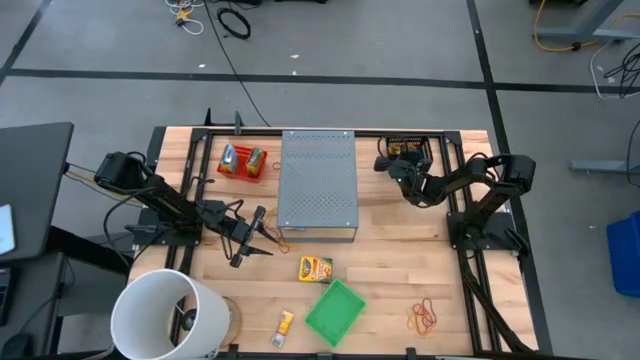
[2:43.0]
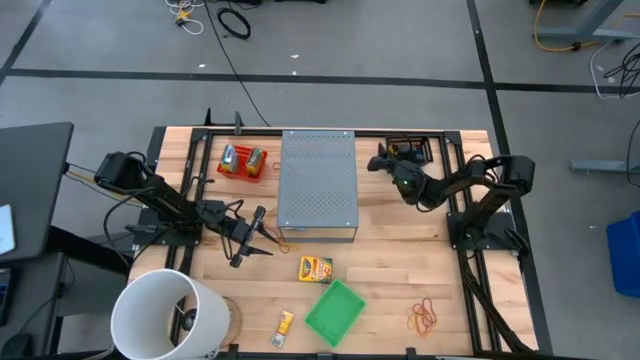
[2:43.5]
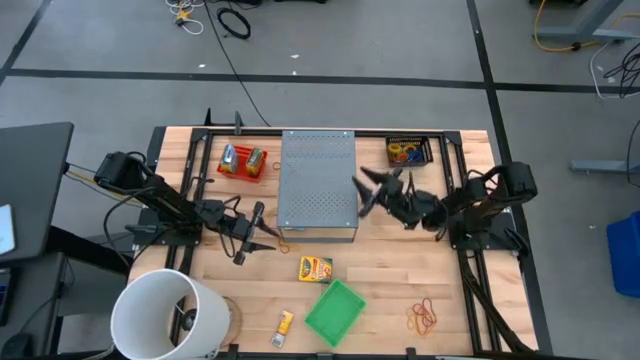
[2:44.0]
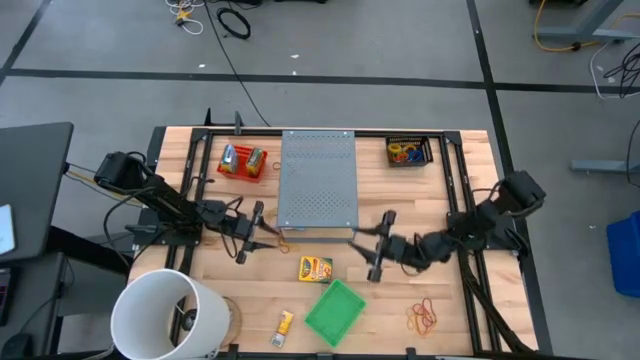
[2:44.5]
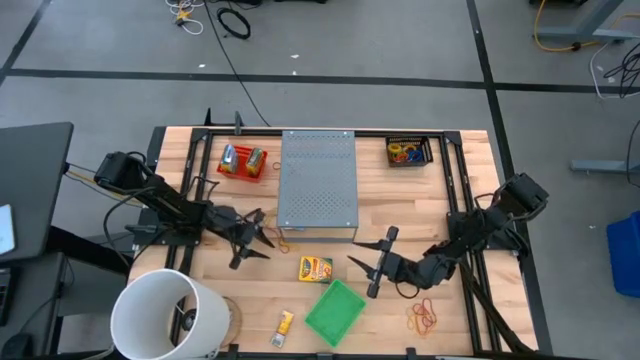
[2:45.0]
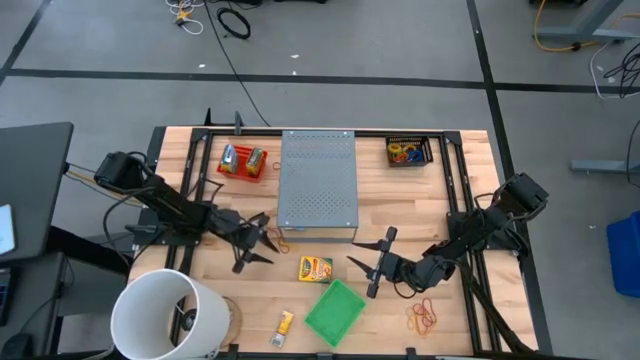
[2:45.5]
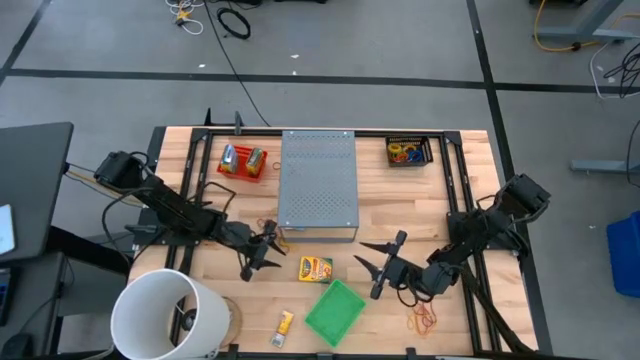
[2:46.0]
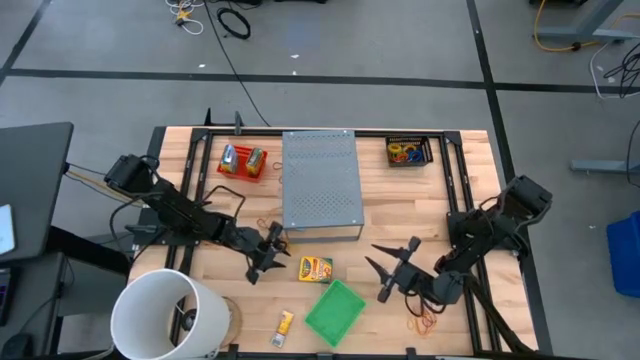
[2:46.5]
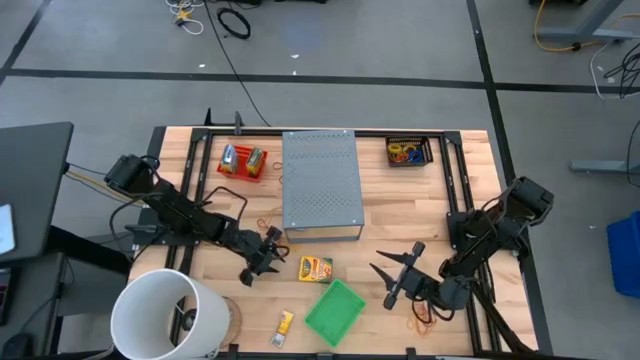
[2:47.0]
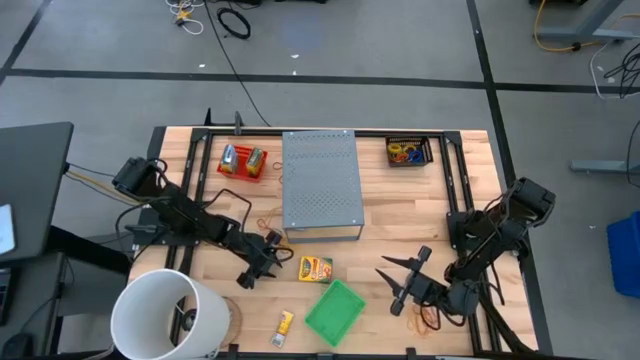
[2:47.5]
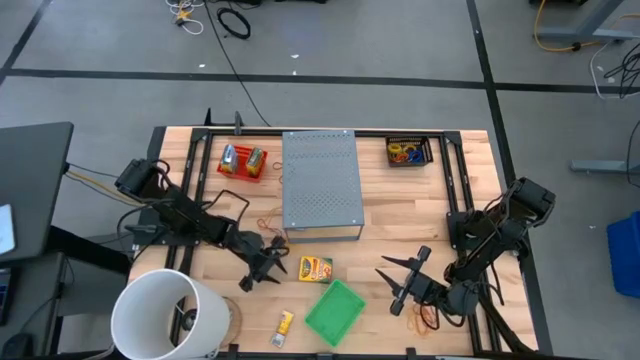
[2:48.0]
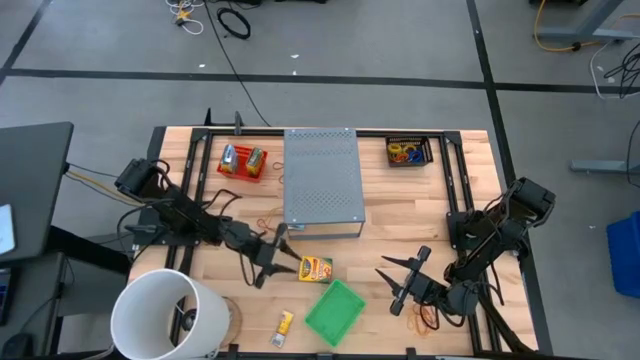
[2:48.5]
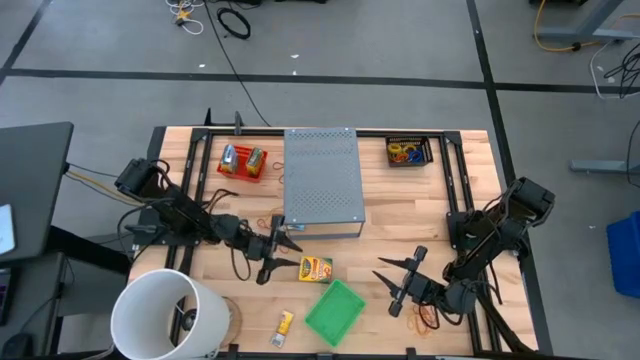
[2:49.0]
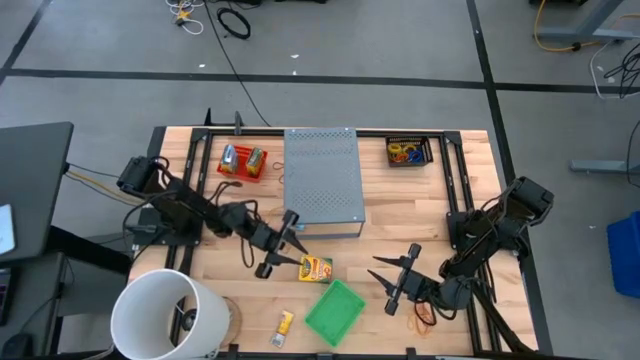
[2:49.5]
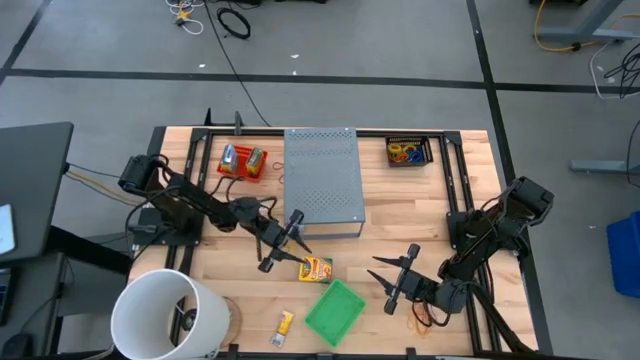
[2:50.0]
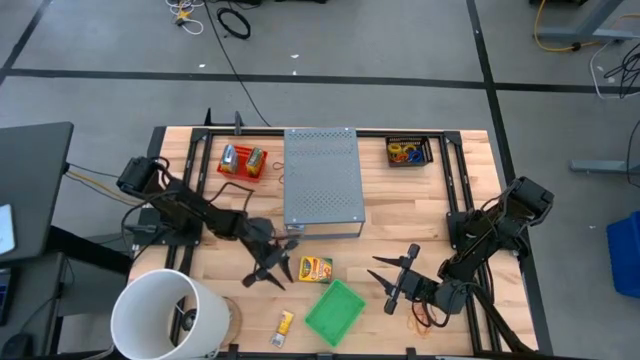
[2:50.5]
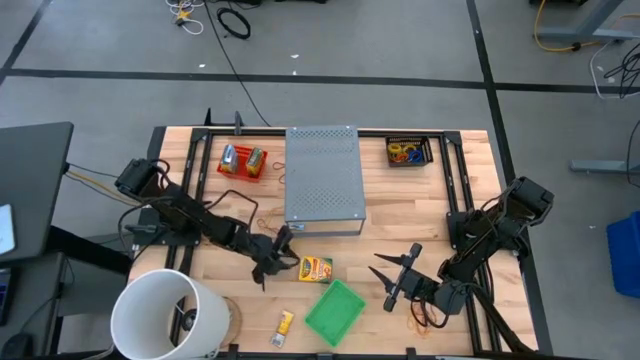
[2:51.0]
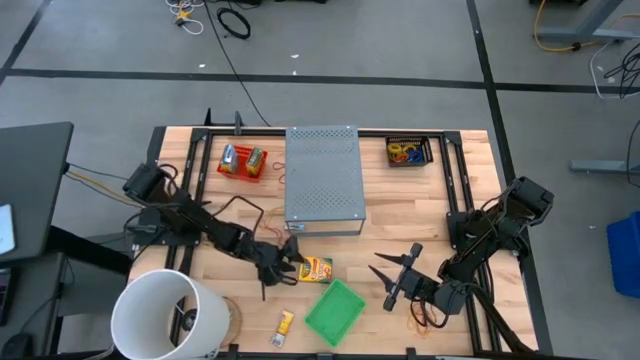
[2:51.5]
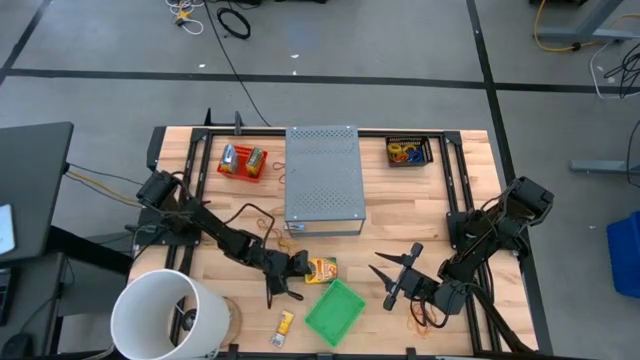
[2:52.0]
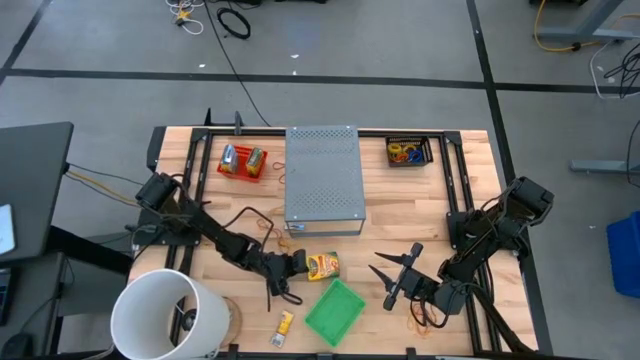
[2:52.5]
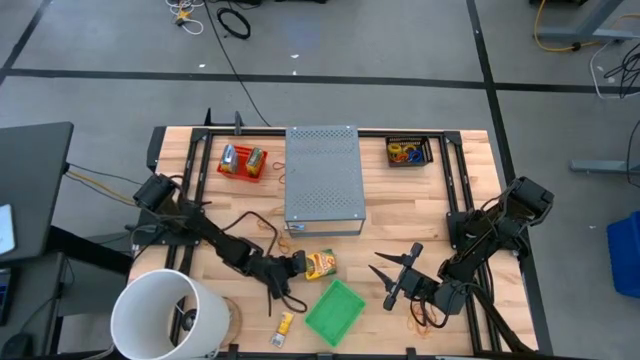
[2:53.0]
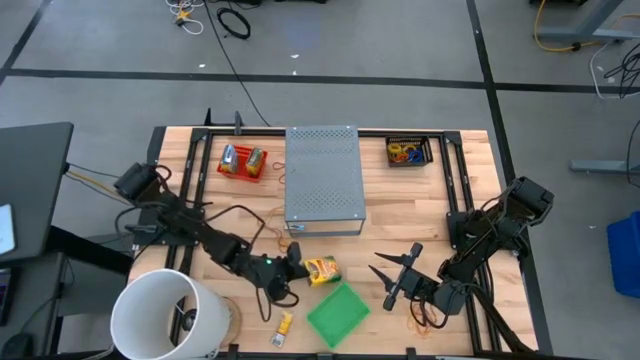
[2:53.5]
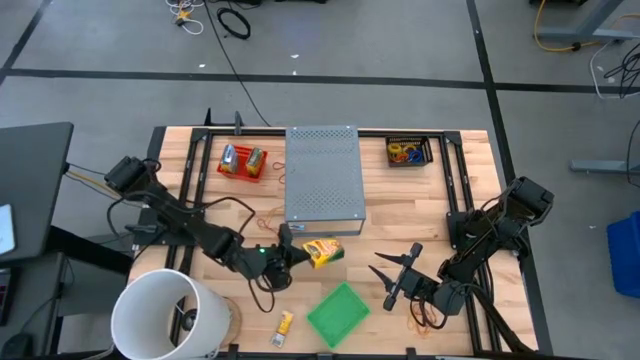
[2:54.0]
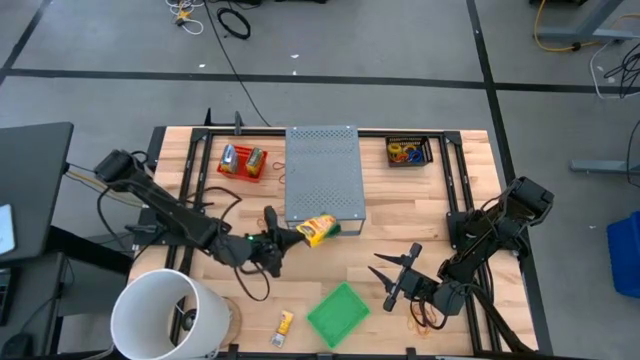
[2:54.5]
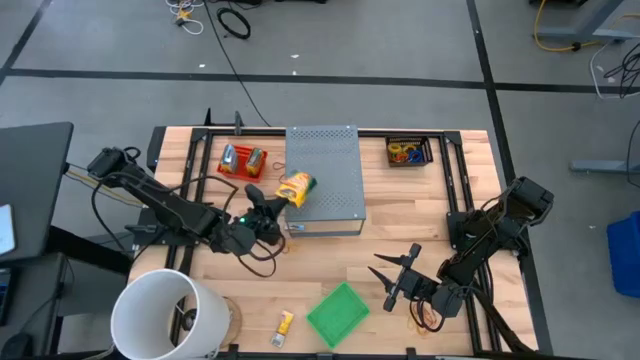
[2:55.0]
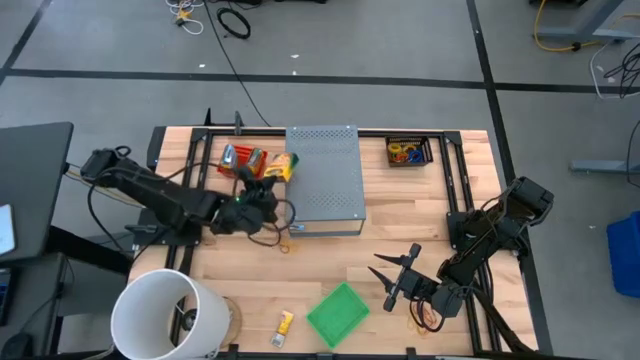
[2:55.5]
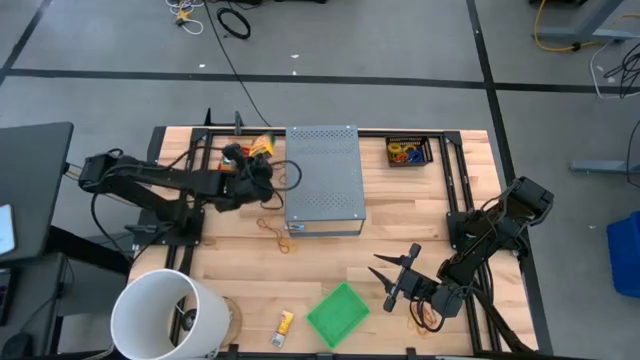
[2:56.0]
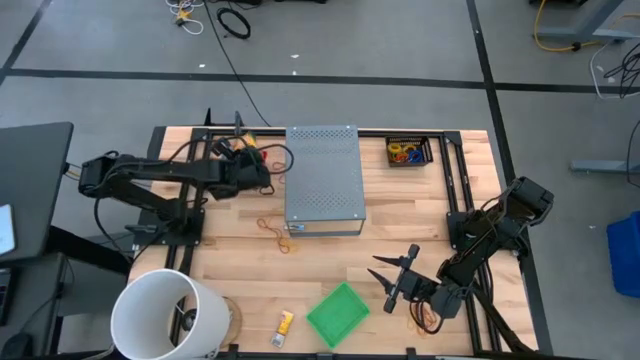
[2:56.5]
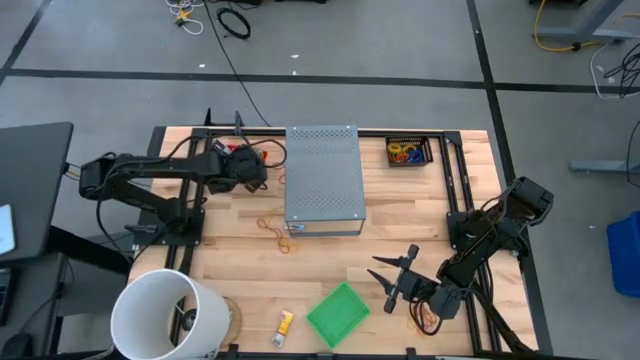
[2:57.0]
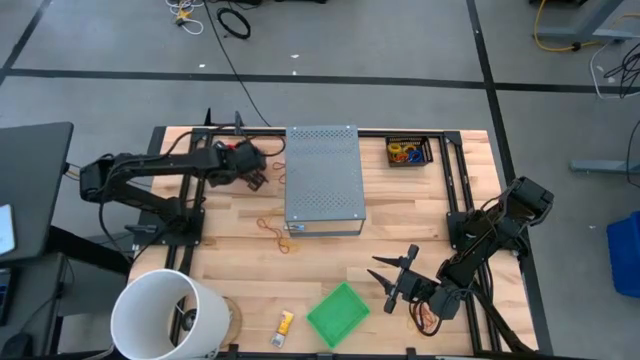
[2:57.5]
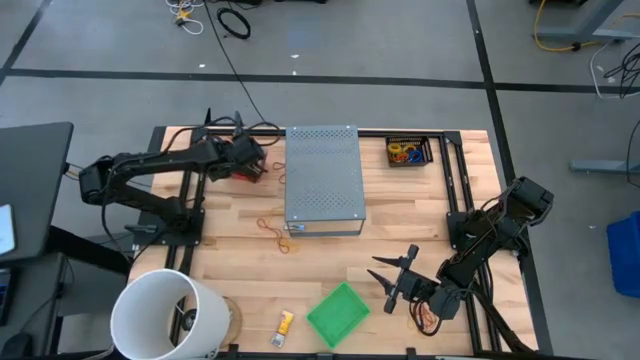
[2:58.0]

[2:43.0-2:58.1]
Task: Pick & Place Office Desk Supplies
Put the yellow crayon box into the red basket

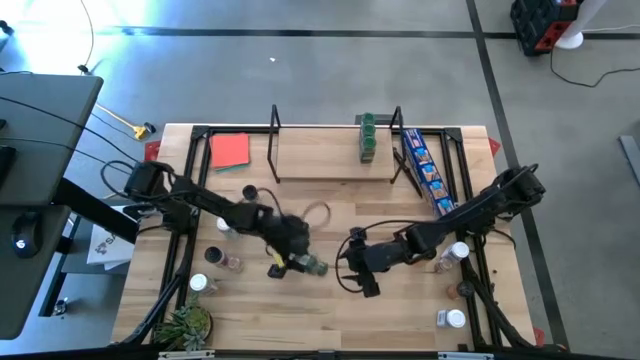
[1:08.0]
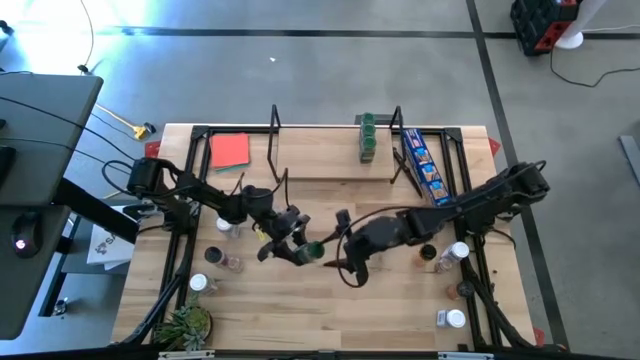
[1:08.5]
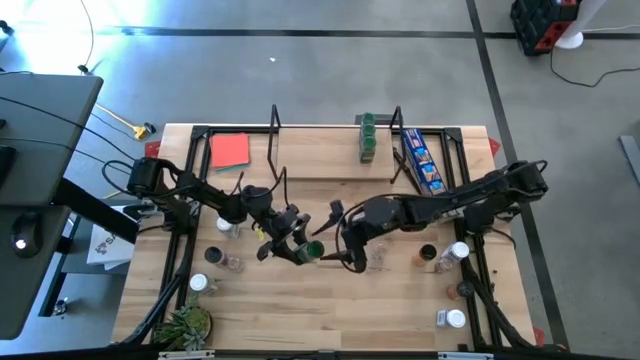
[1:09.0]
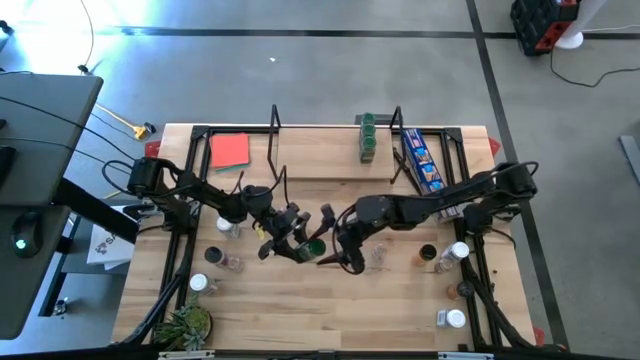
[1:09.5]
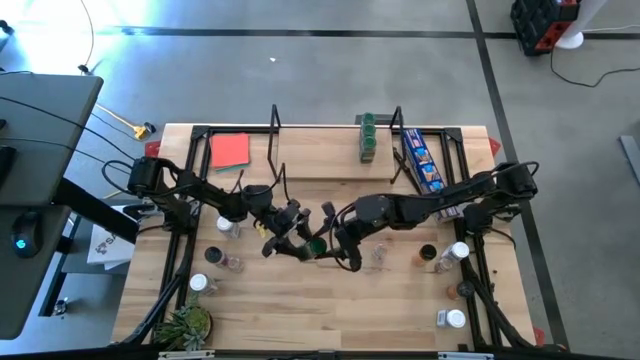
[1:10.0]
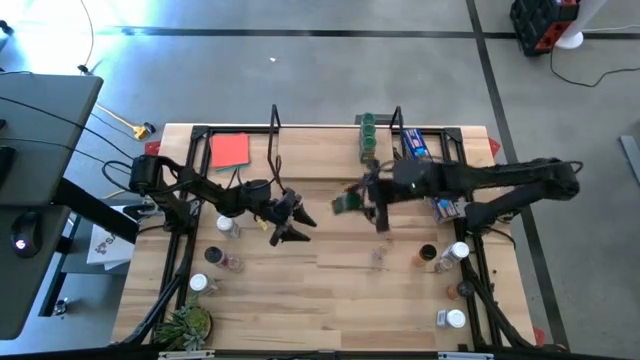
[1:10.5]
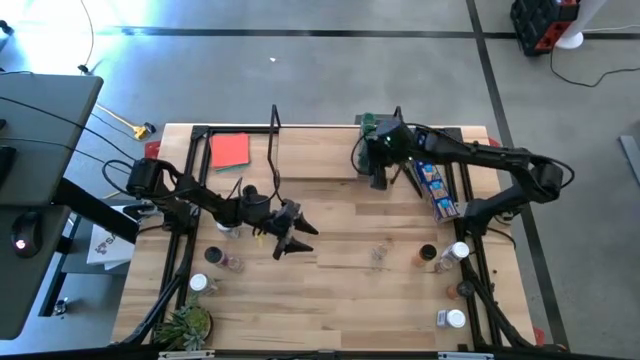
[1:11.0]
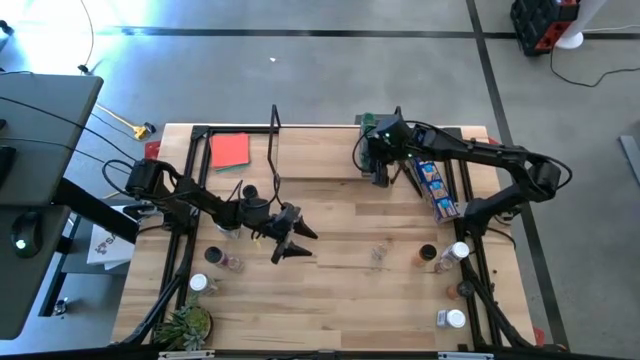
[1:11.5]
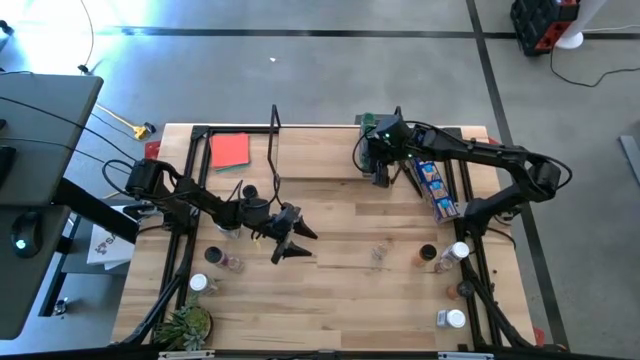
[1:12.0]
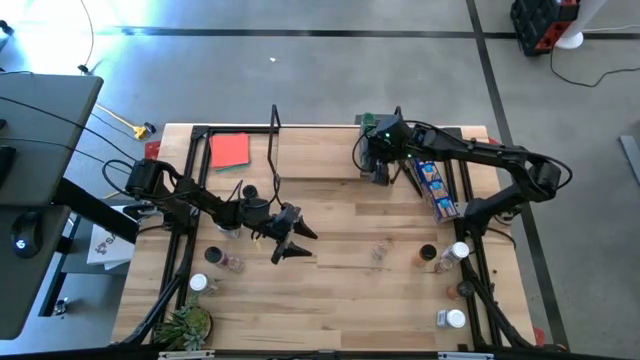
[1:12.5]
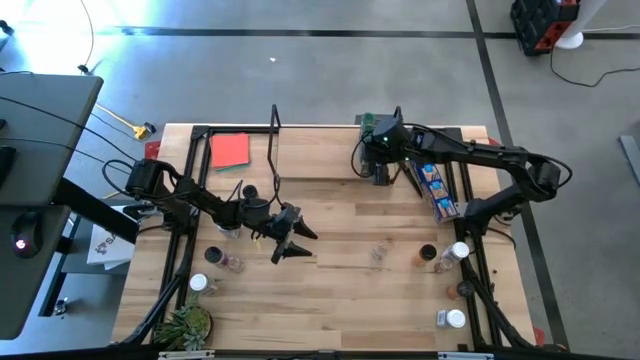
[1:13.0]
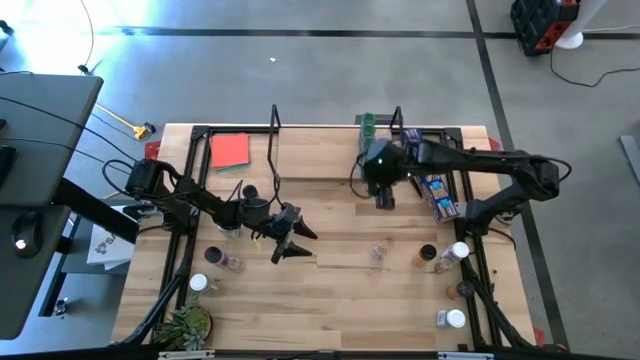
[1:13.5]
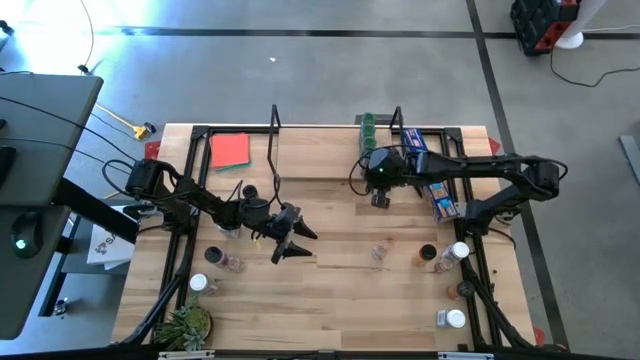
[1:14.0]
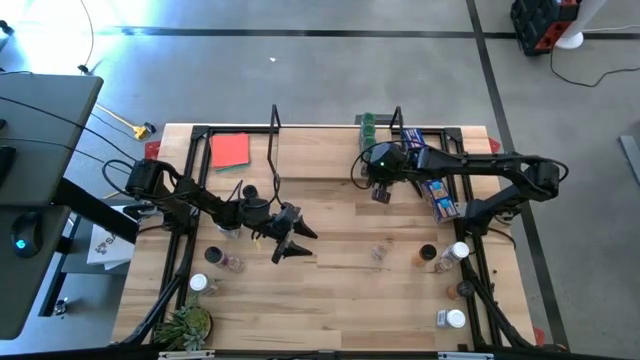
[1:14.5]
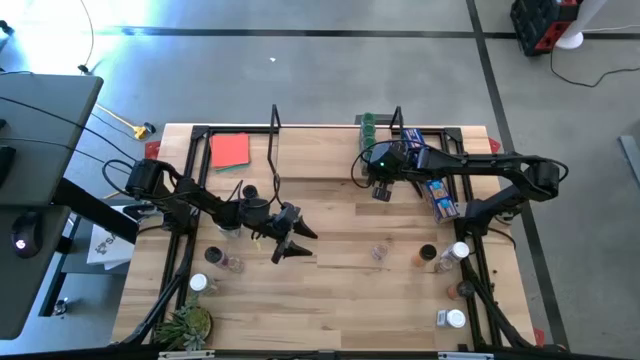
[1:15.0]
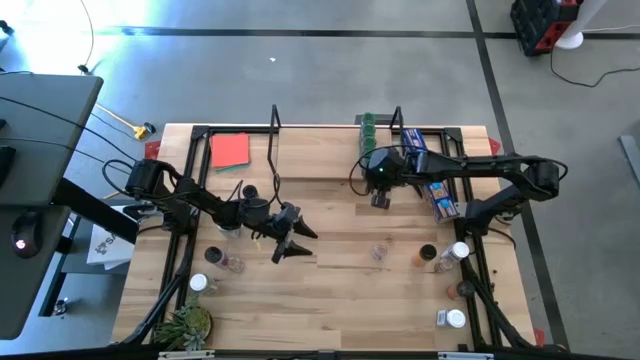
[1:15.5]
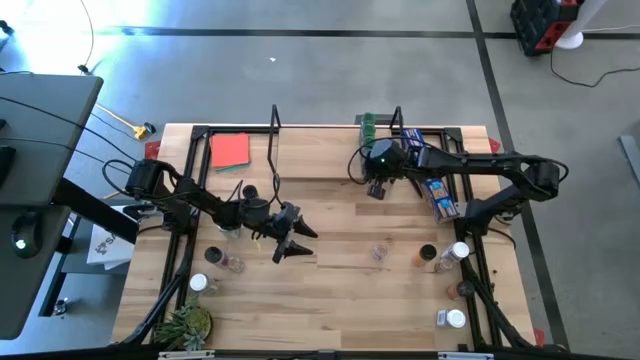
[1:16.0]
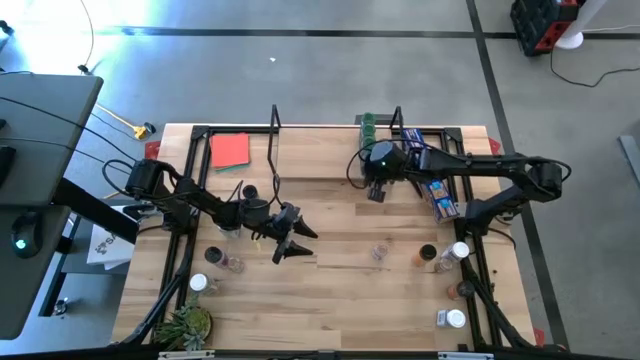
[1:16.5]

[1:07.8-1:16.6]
Task: Shelf spices
Put the green seasoning bottle on the shelf aligned with the other green seasoning bottle
